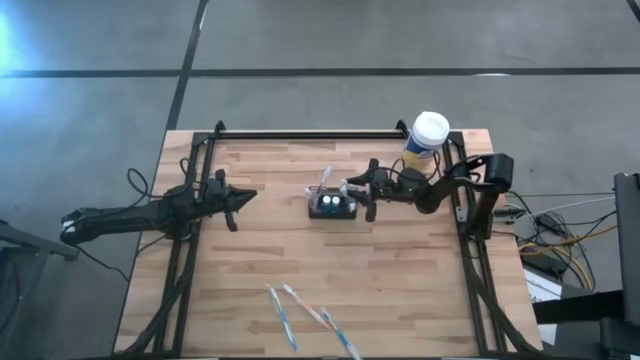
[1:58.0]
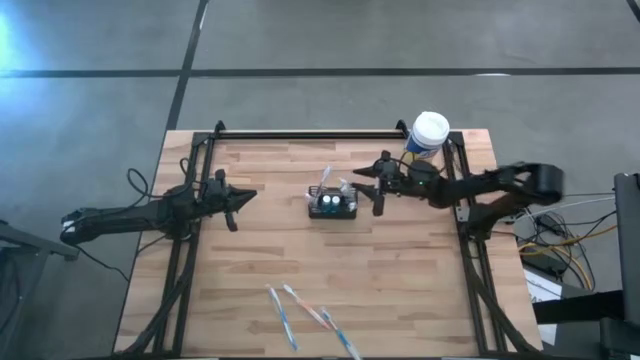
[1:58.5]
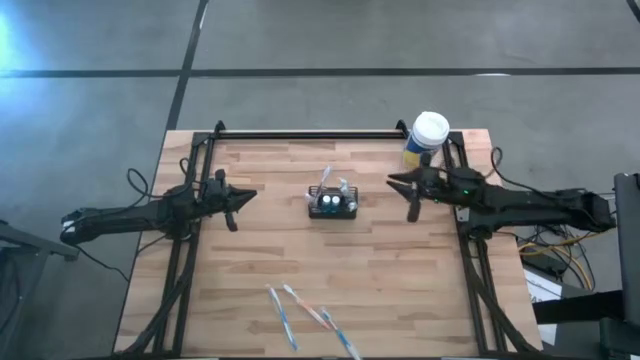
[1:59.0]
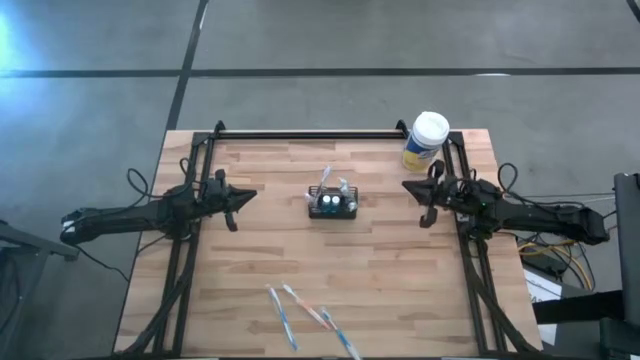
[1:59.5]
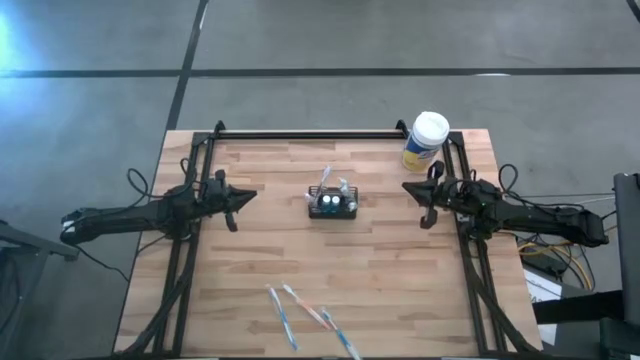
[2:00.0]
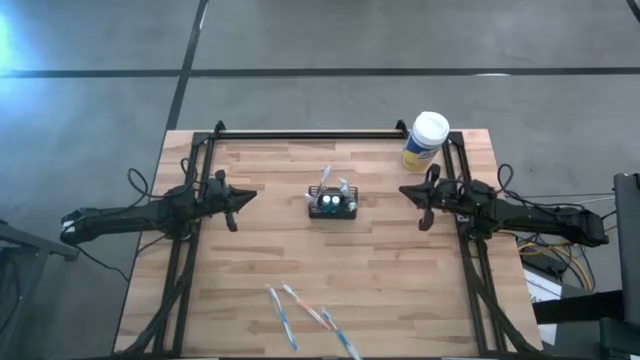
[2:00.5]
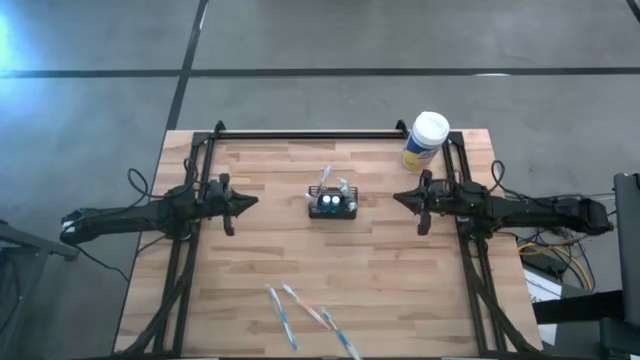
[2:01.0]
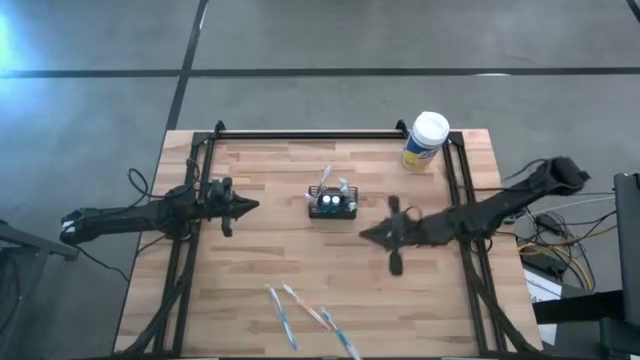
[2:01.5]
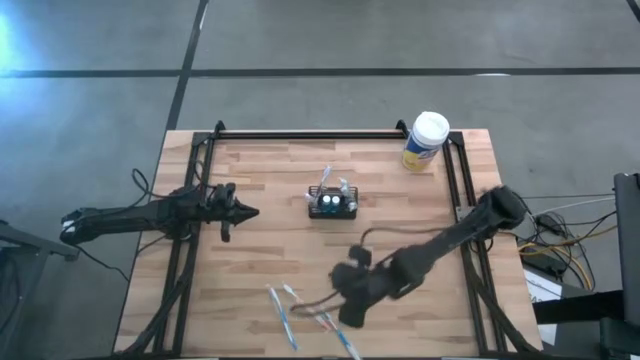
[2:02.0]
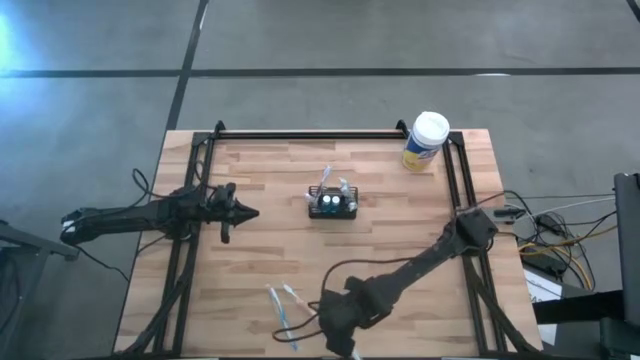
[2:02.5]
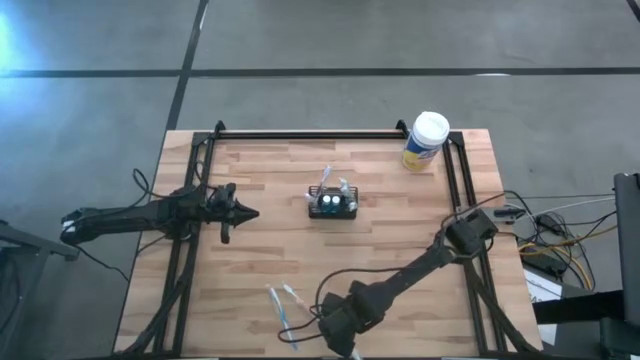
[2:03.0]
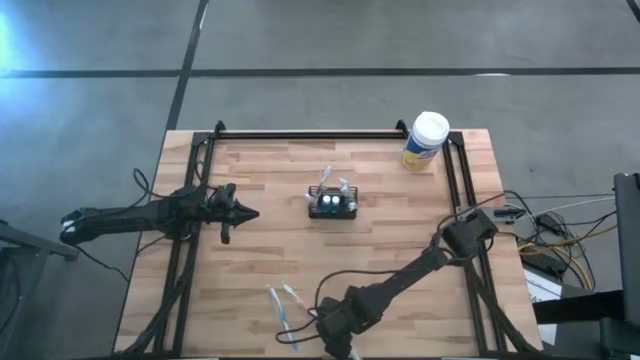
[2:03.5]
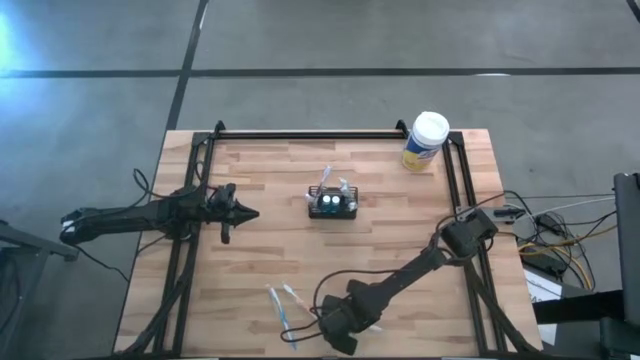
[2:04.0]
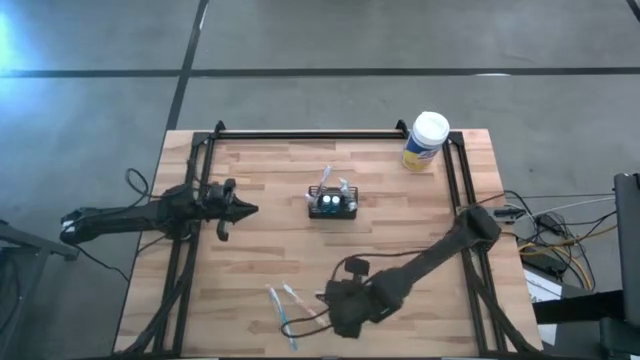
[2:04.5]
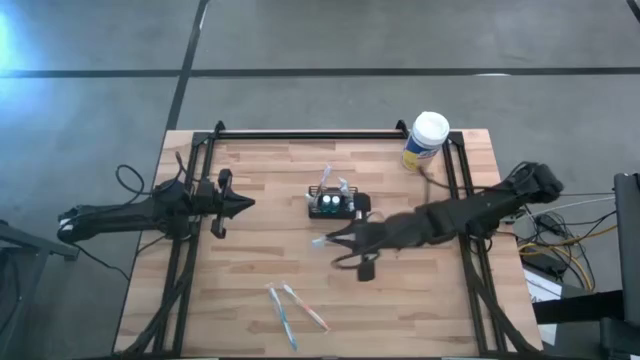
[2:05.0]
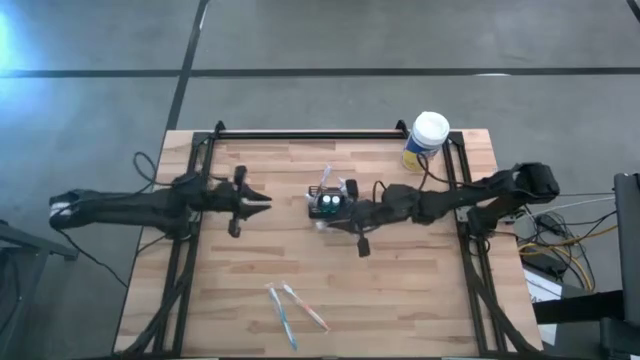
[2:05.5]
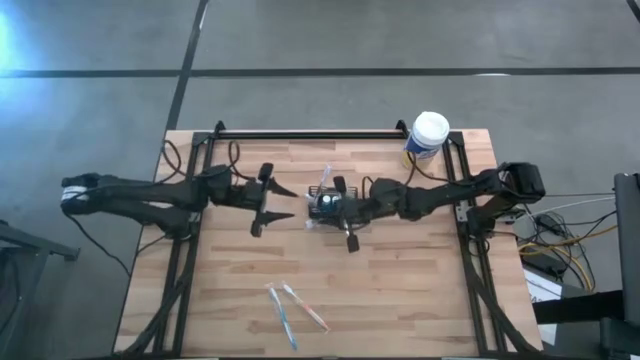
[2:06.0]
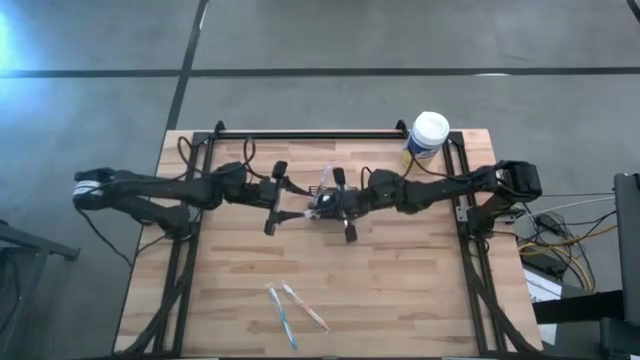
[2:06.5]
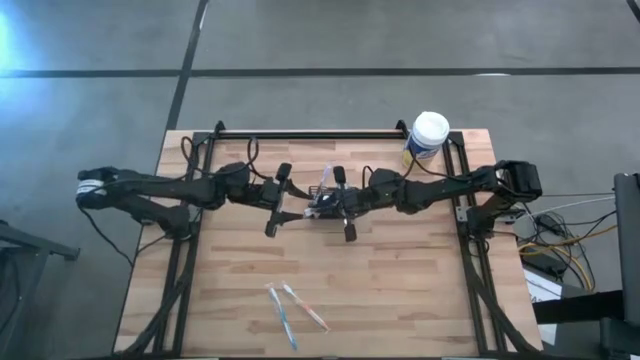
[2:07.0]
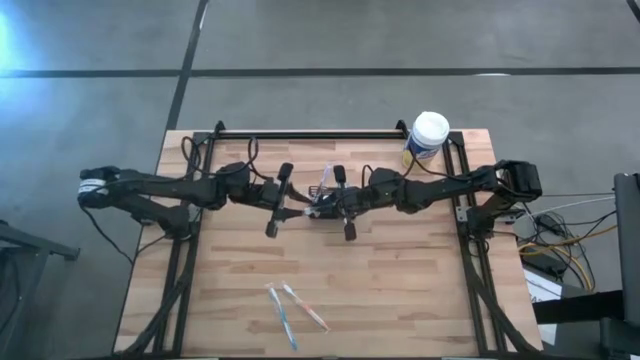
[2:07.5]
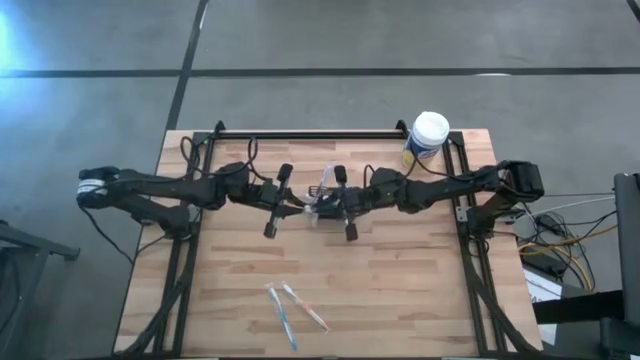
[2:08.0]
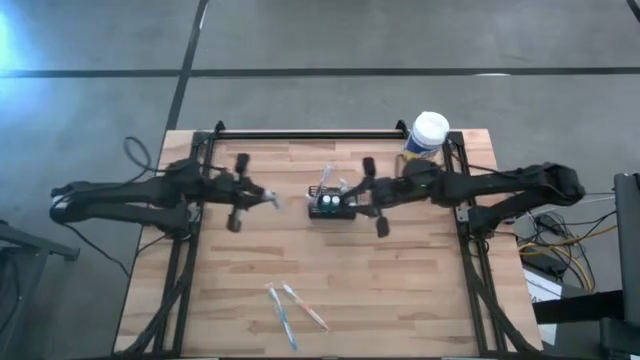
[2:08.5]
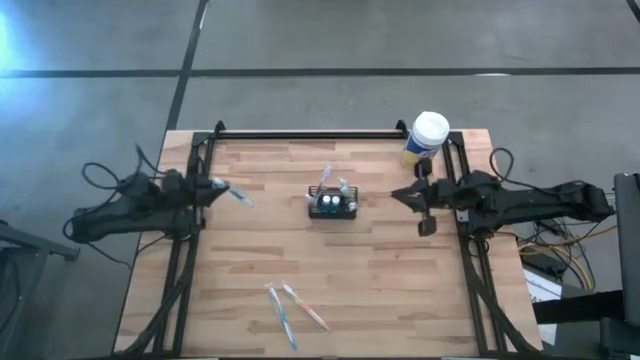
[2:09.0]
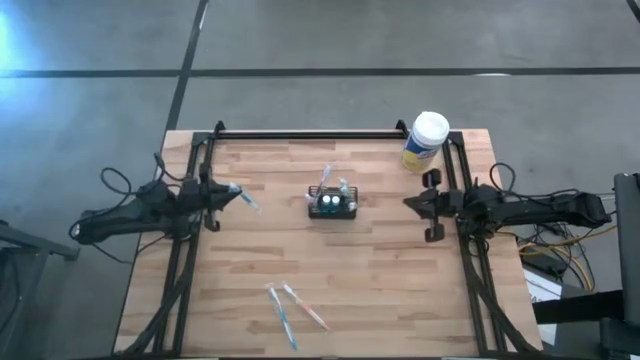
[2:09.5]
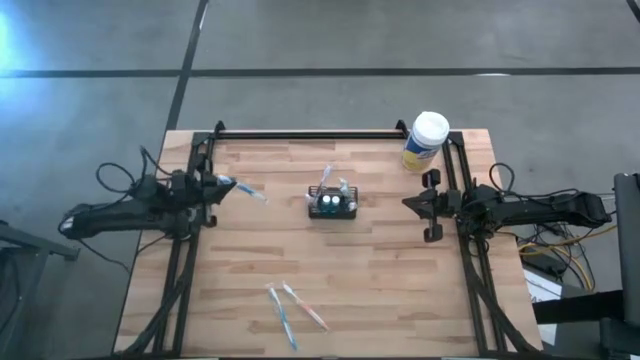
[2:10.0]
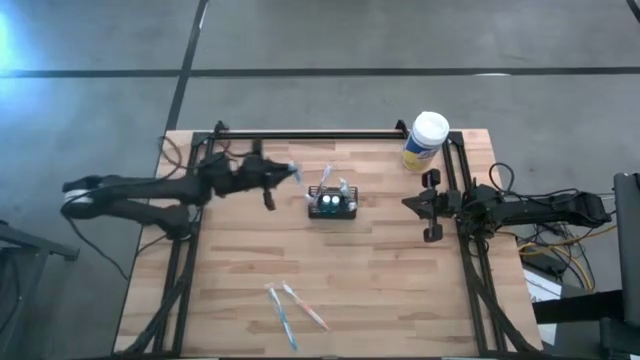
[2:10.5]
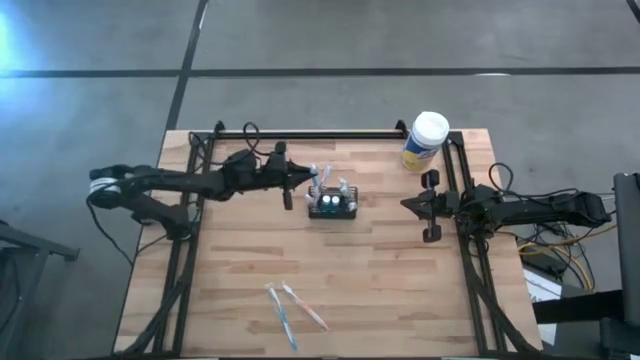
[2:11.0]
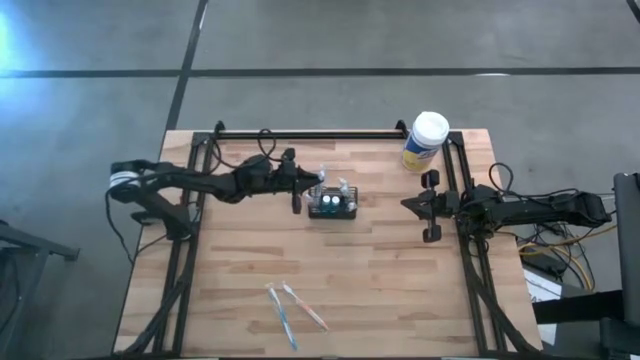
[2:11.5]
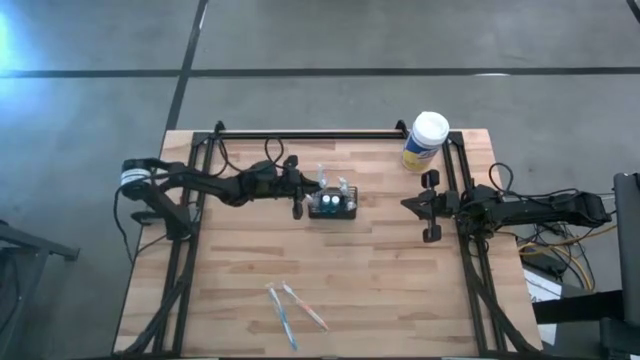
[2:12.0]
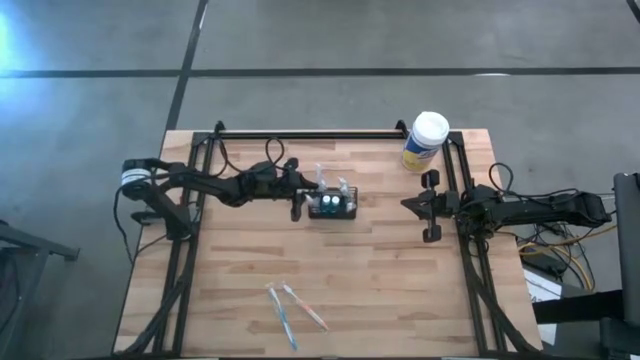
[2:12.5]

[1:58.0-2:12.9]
Task: Pick & Place toothbrushing station
Put the right blue toothbrush into the black organizer

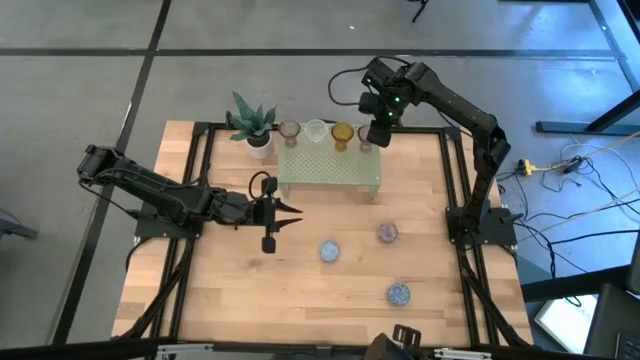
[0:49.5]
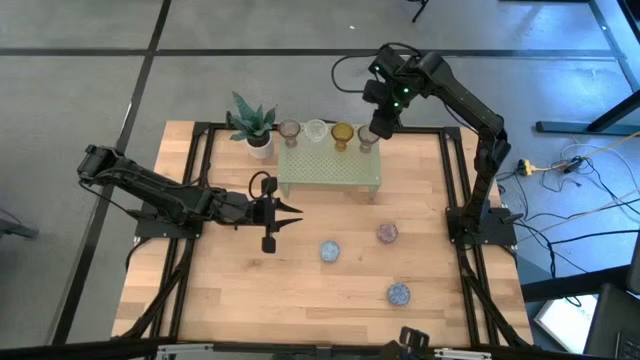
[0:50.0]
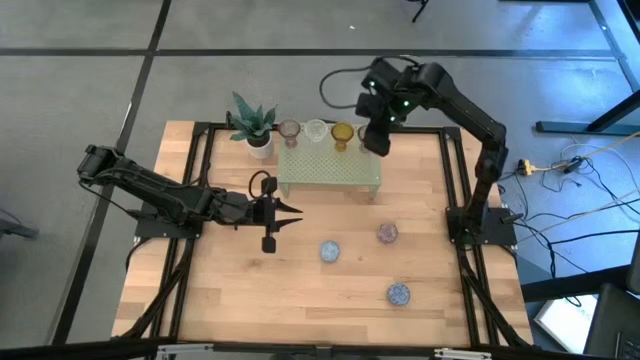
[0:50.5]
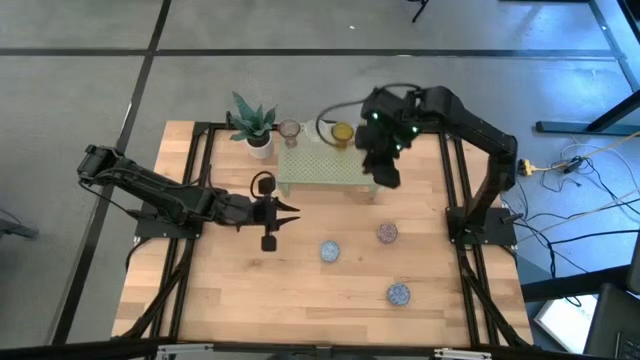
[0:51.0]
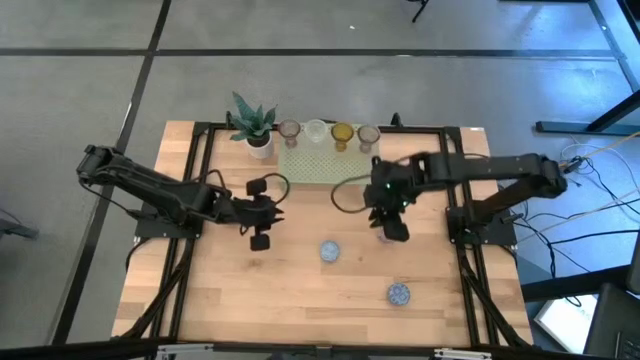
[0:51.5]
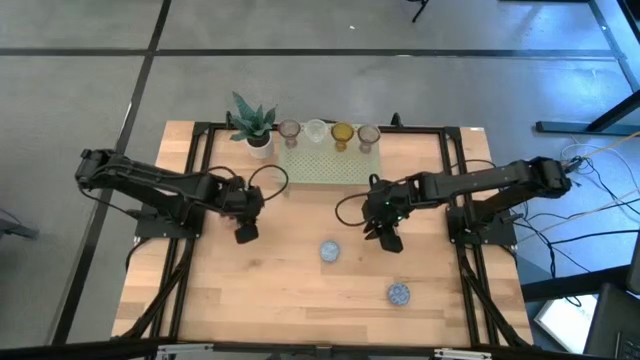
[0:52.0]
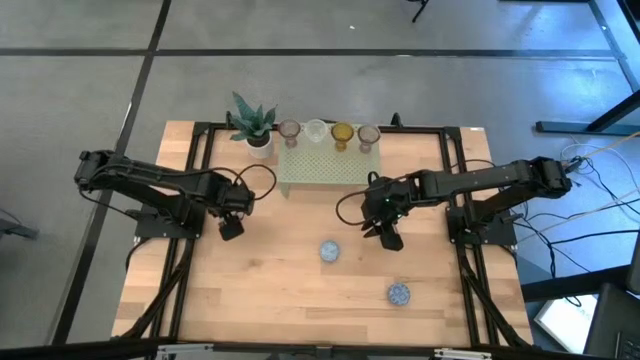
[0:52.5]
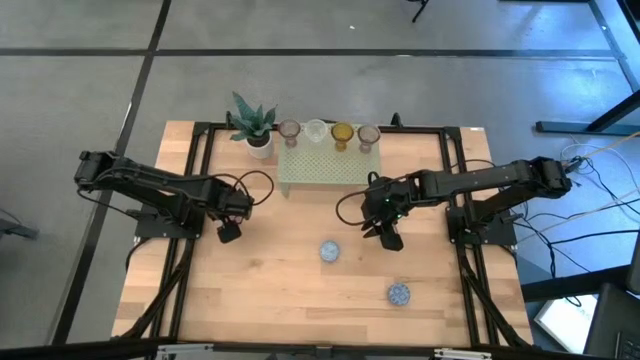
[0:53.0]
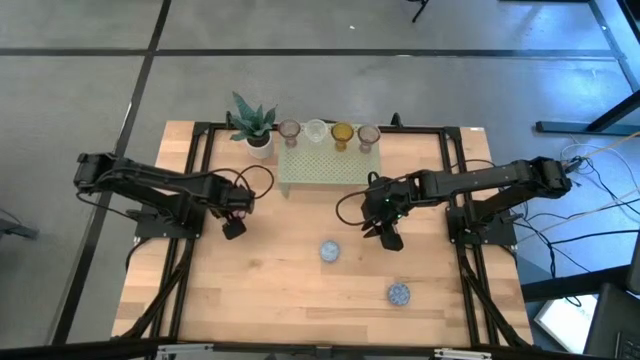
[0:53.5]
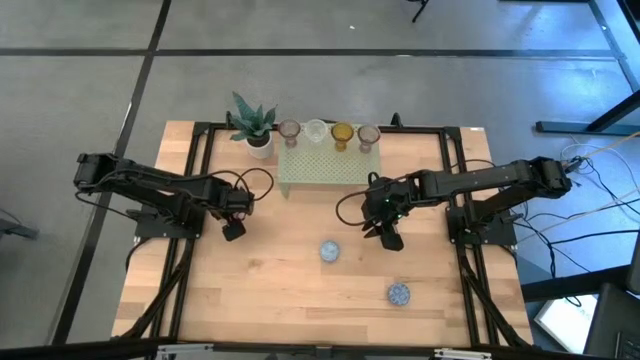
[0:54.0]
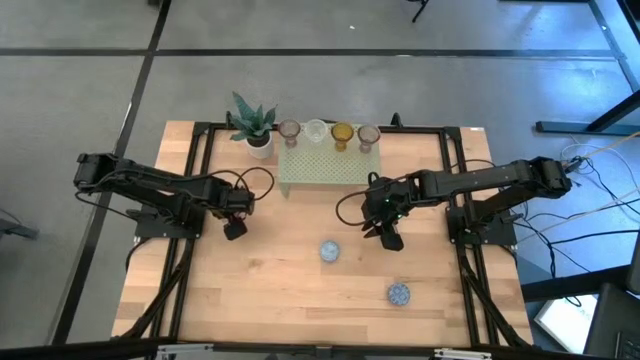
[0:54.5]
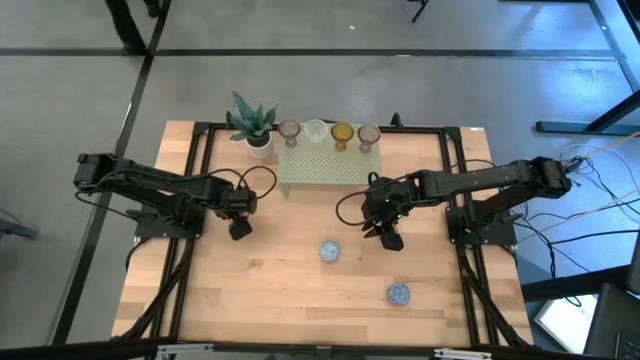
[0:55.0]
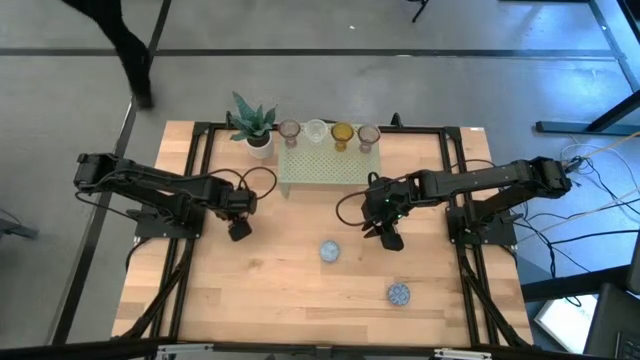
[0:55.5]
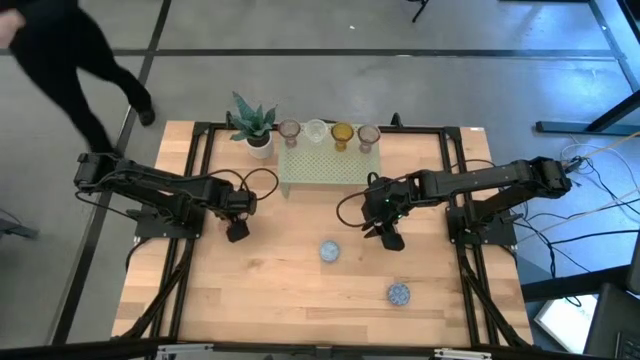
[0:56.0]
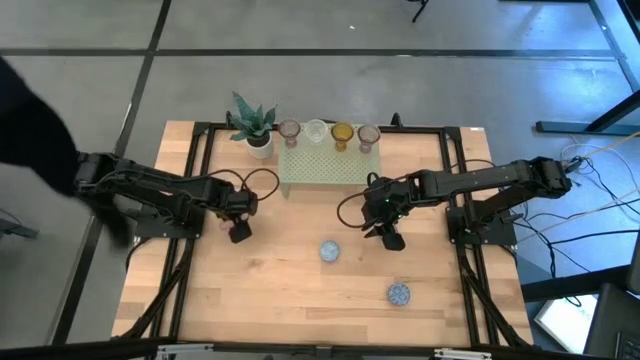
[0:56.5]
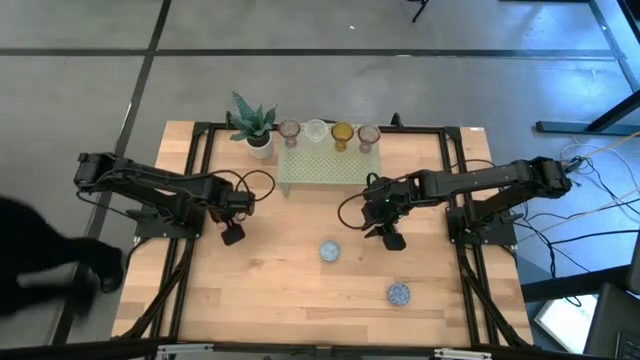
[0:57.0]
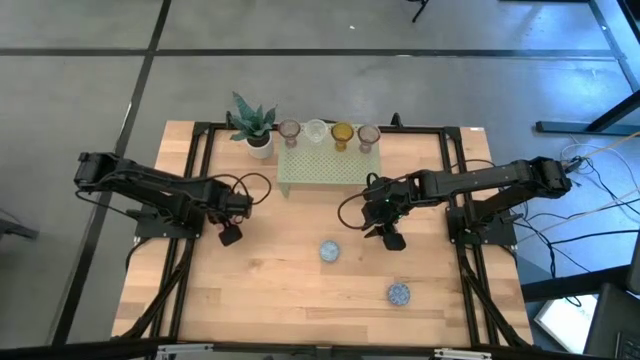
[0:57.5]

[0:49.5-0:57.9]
Task: Pick & Place candle stick holders
Put the pink scented candle on the shelf
